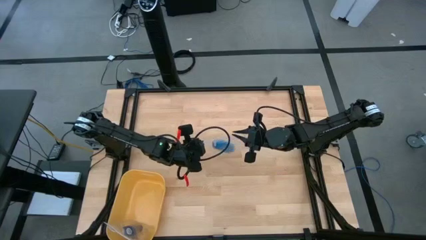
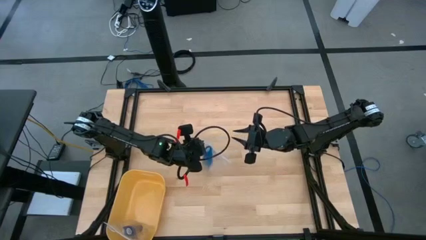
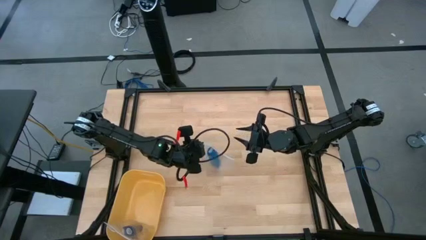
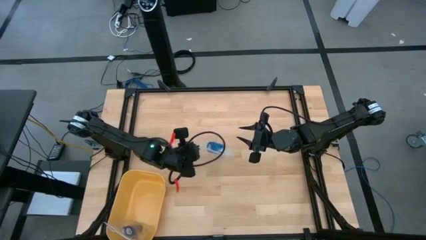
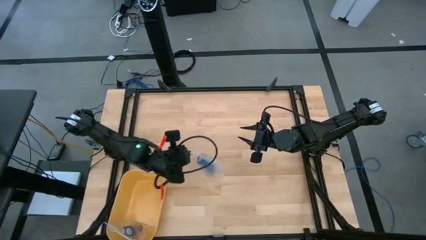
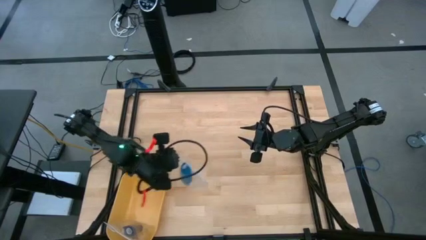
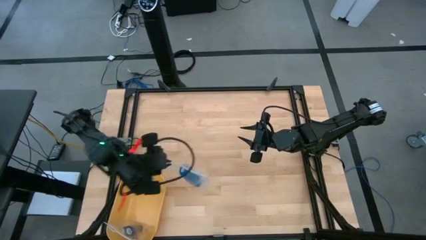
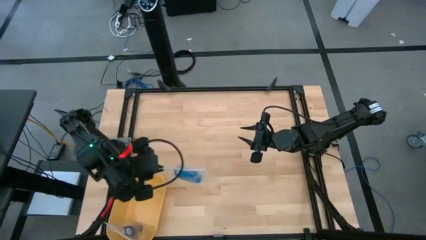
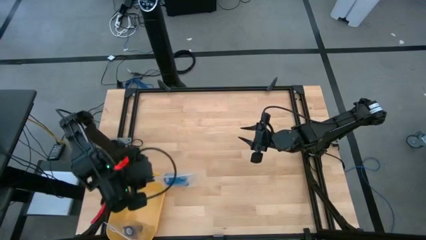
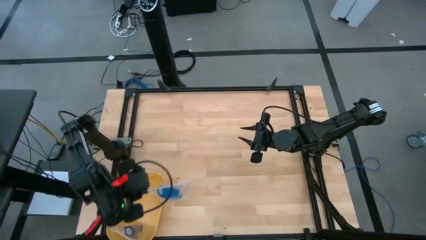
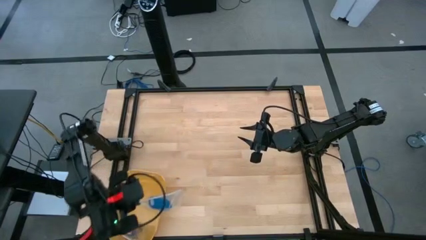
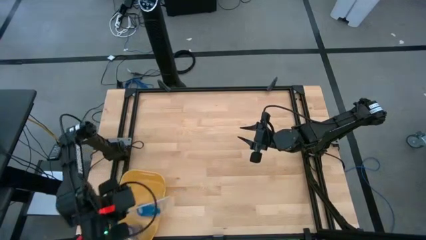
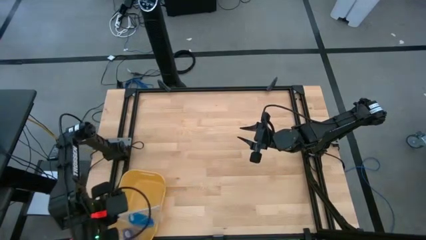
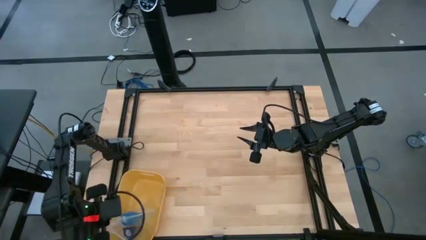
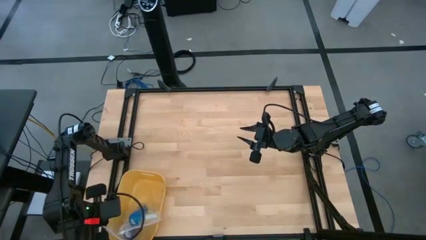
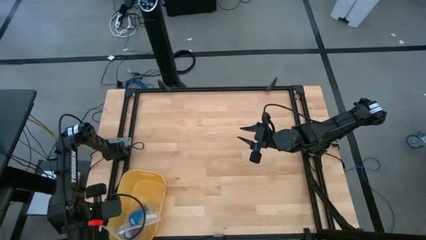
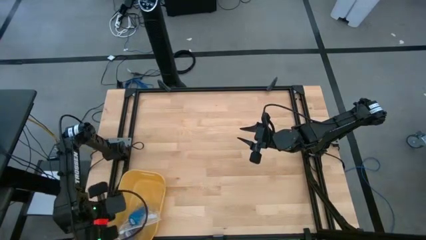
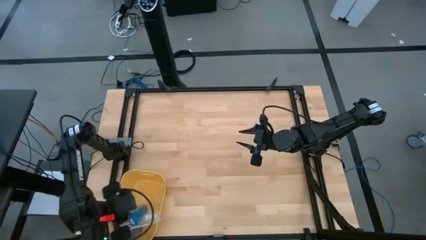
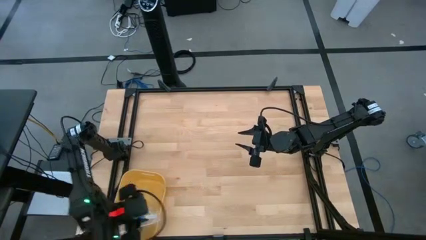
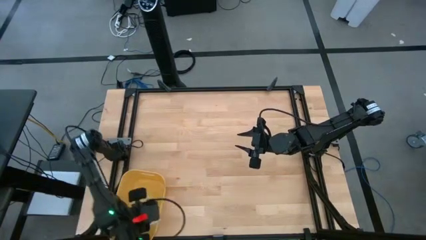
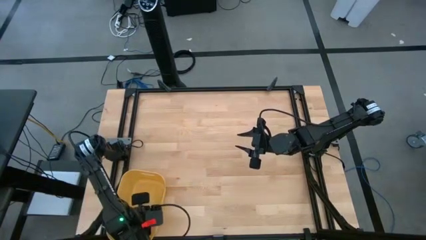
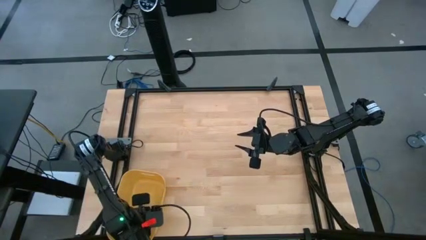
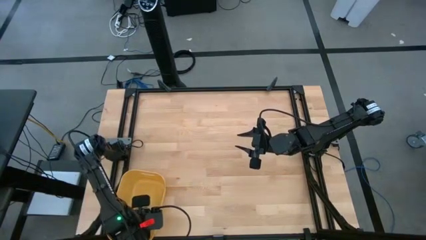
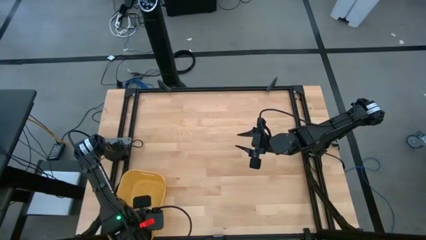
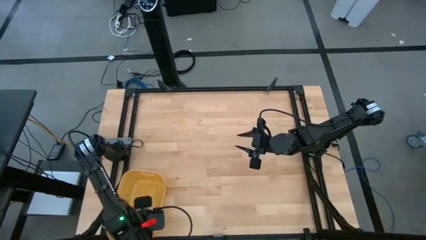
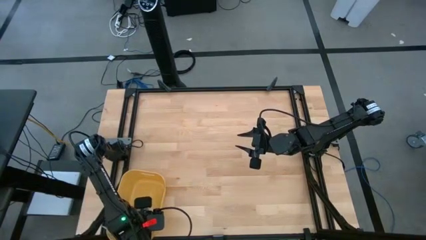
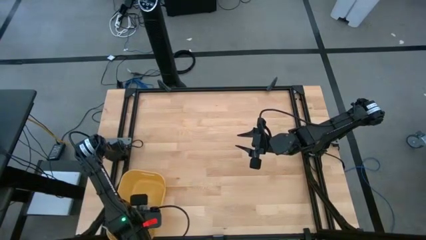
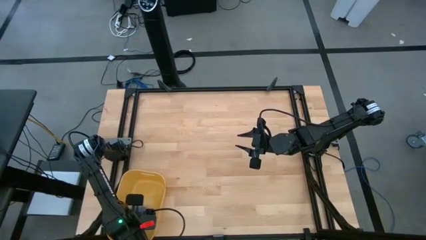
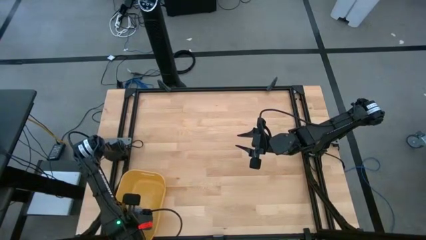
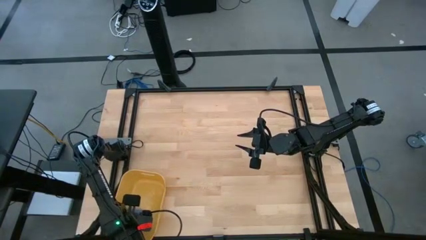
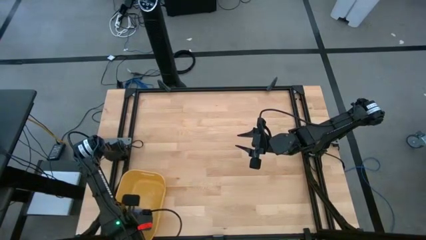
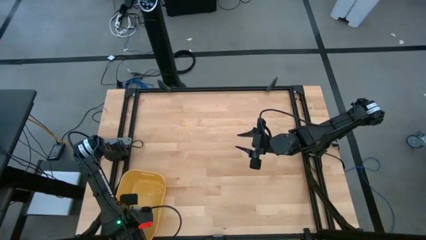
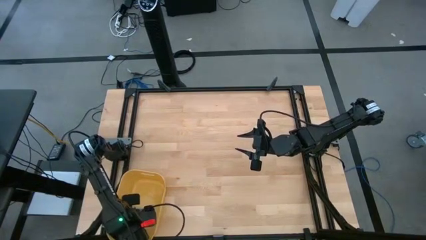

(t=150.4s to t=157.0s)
Task: Roll bandage
Put the zip bag with blue bandage into the yellow bin

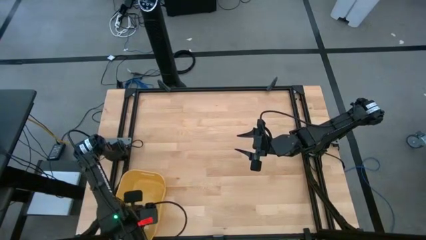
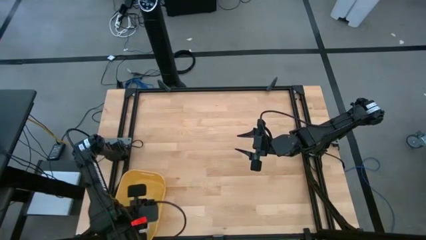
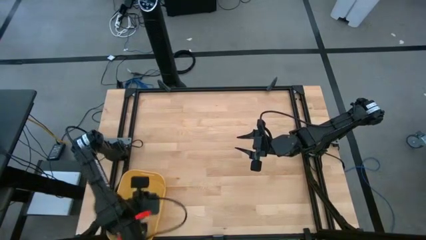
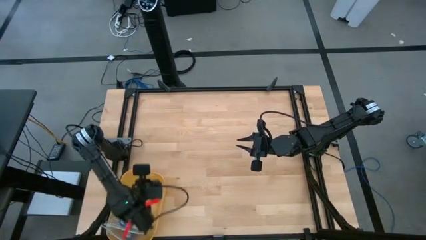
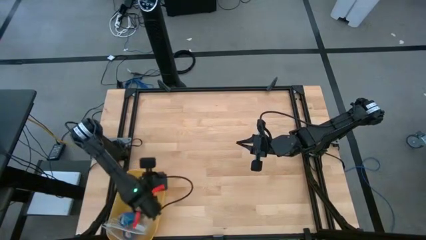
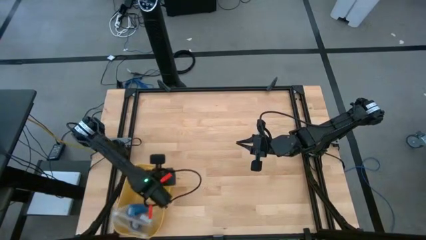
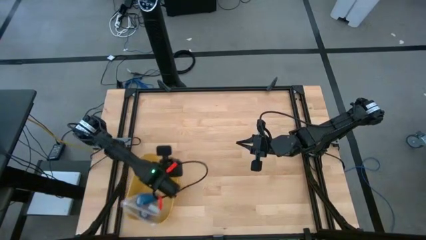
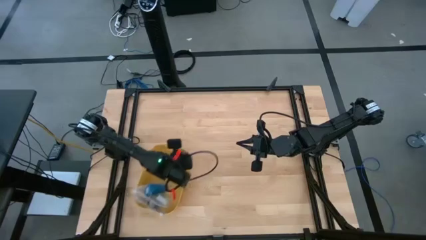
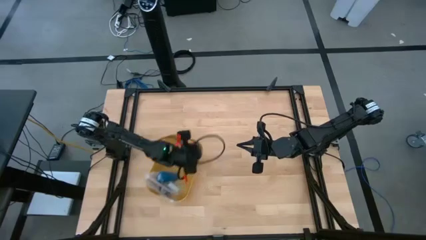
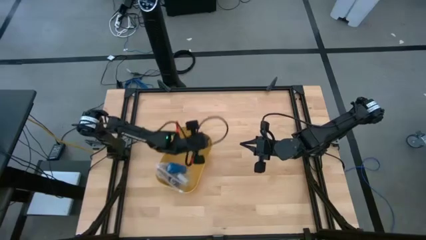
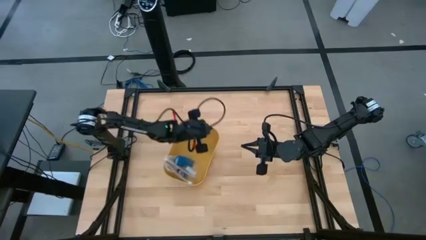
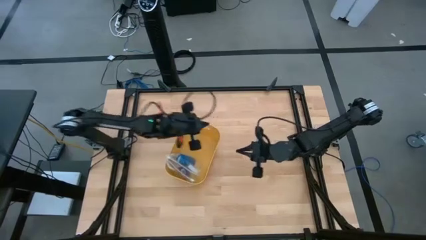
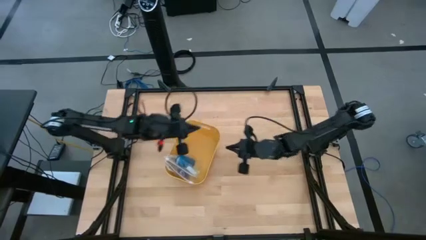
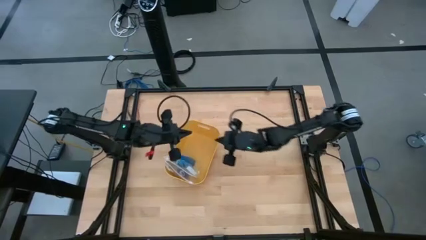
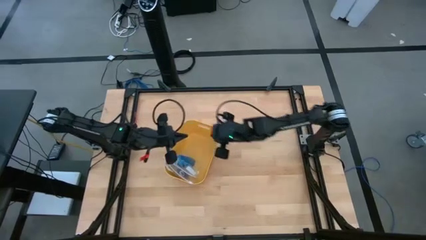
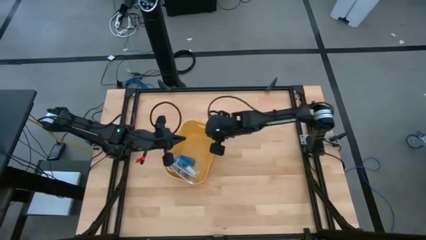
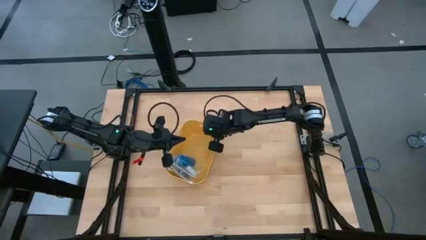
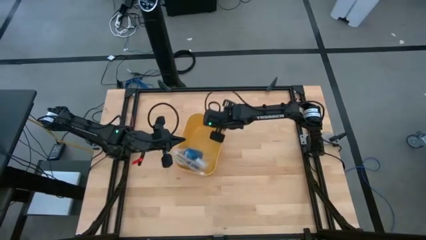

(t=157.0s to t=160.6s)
Move the yellow bin to the center of the table

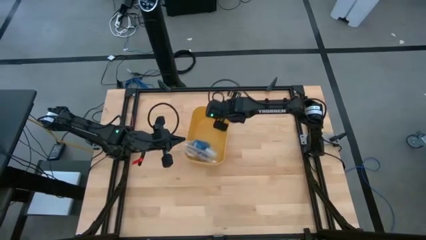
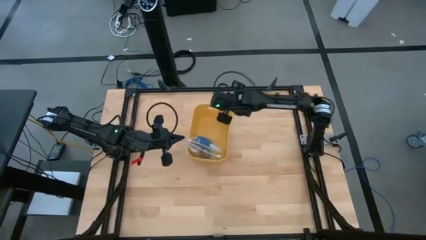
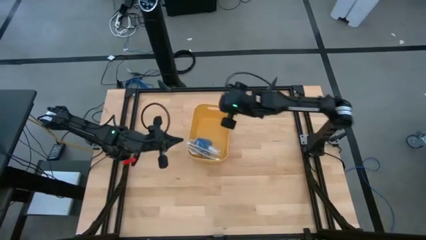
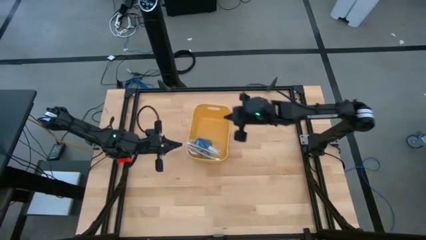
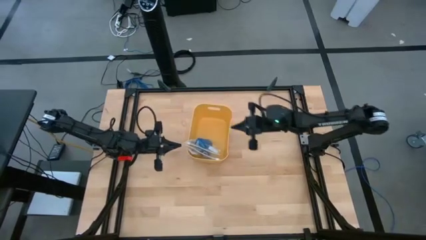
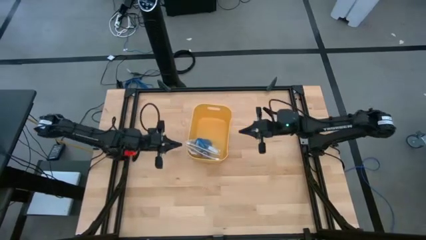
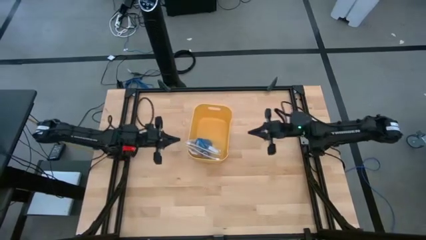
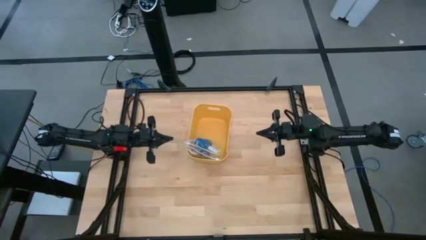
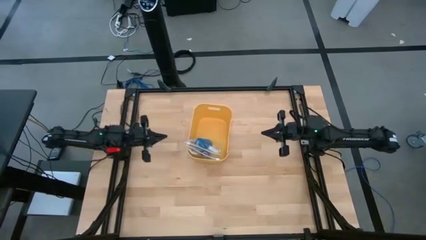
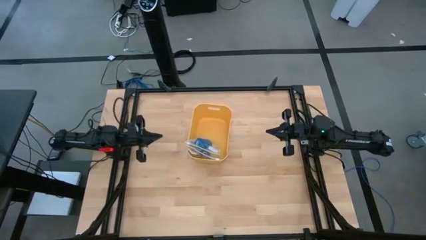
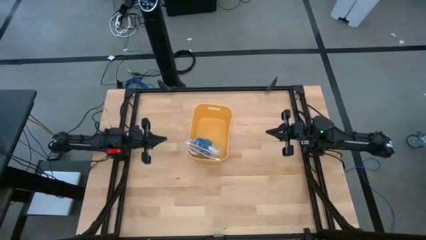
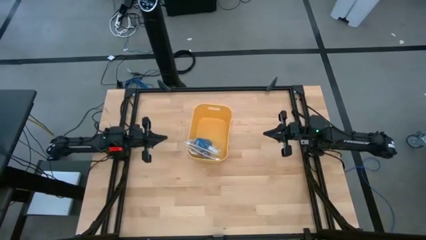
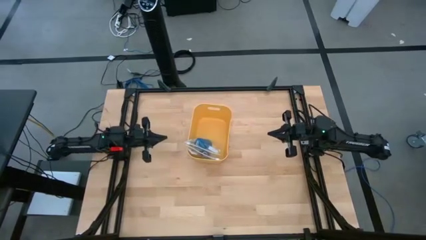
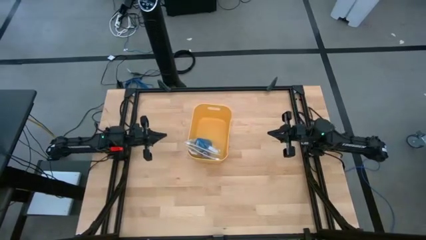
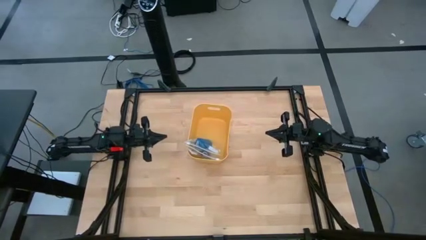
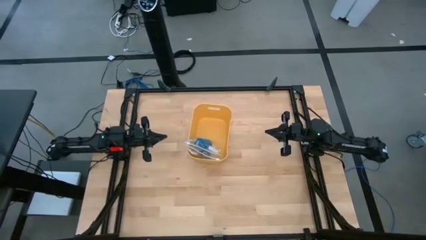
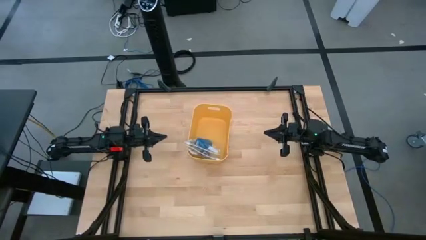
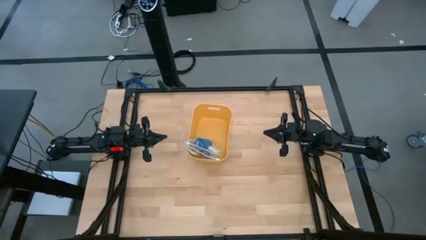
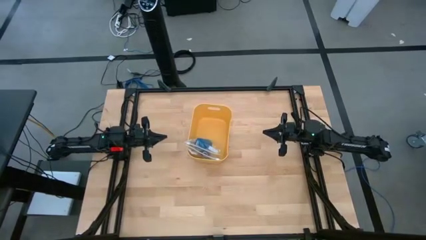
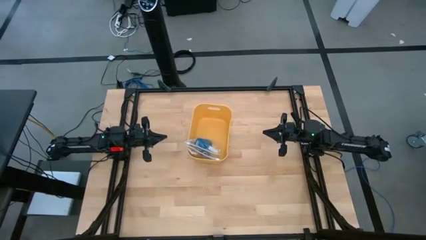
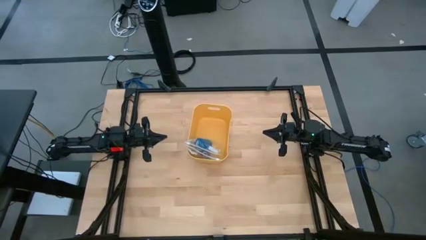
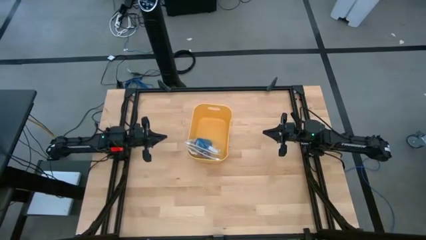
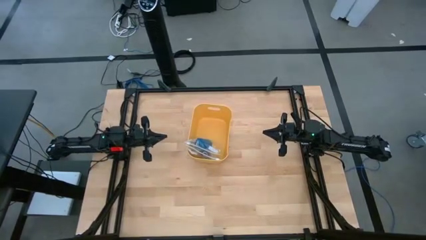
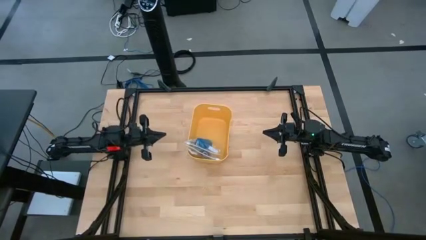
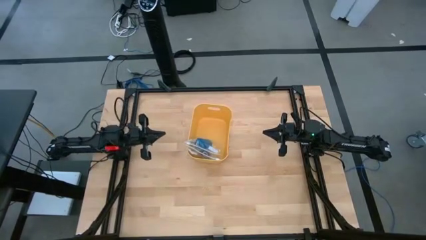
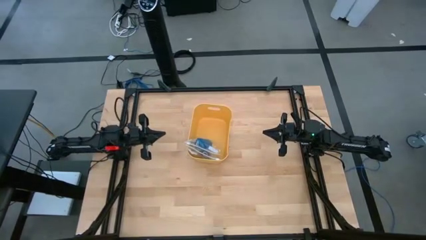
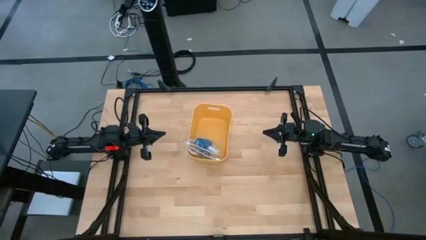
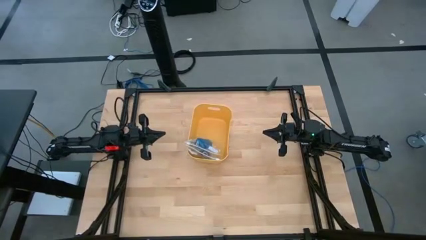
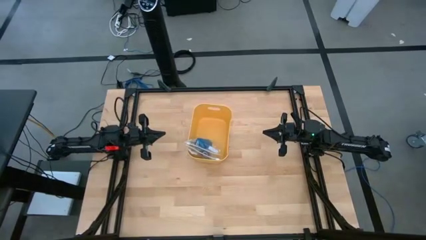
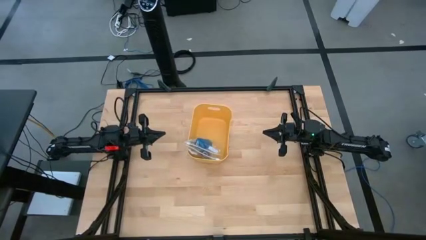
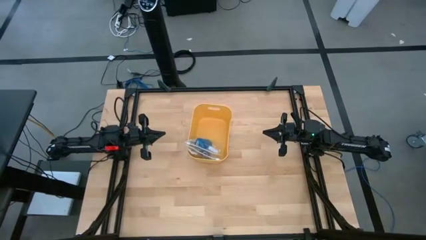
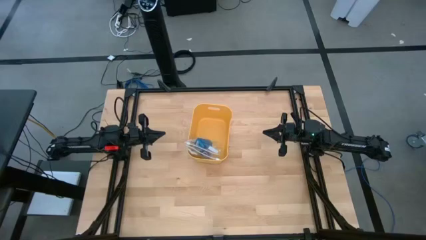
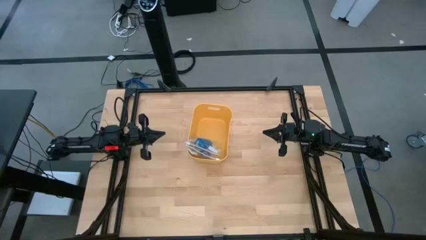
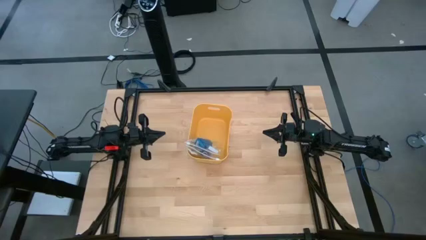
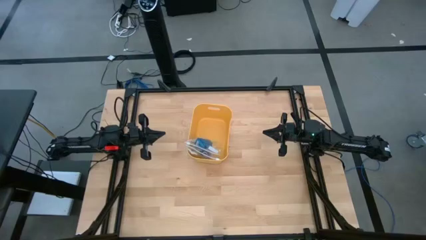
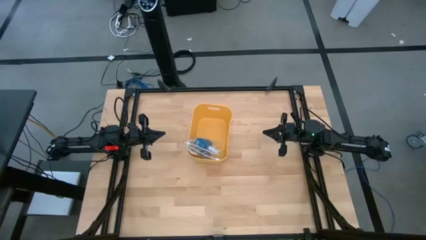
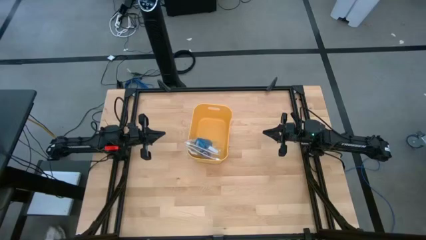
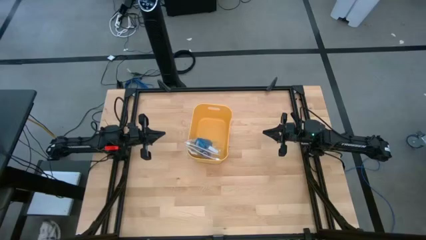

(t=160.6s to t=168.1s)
Return to Home Position
